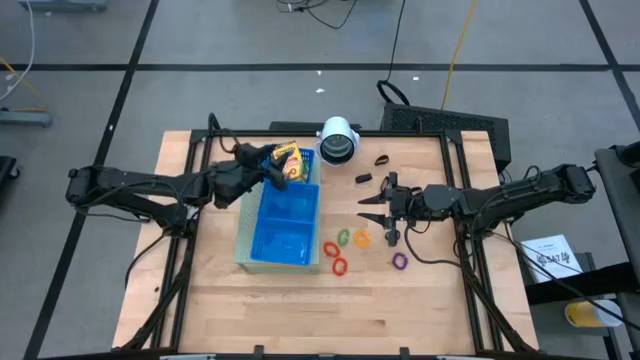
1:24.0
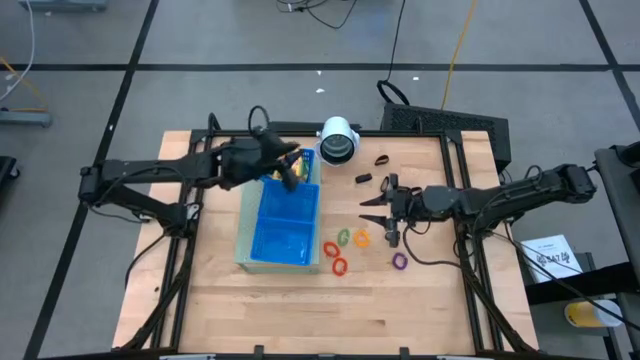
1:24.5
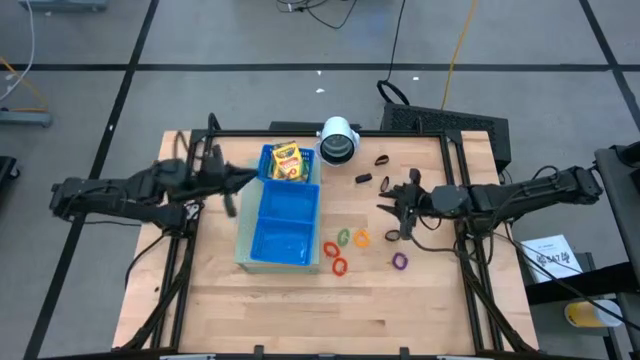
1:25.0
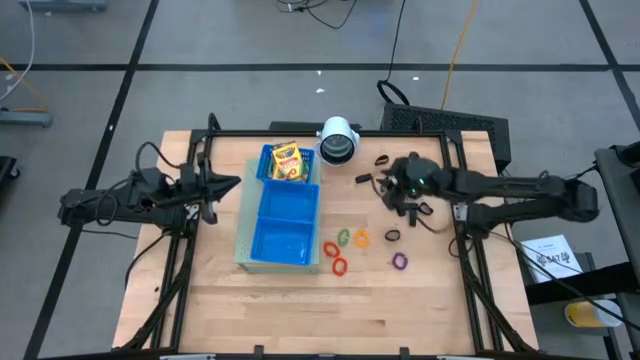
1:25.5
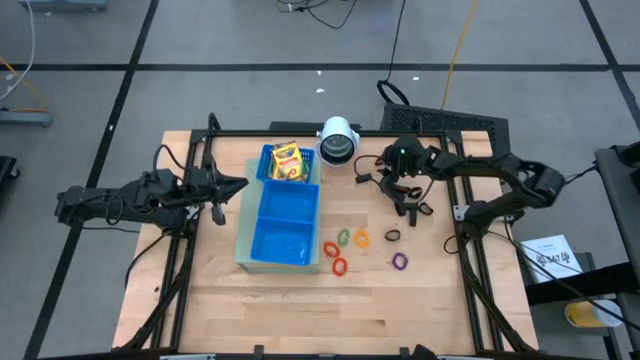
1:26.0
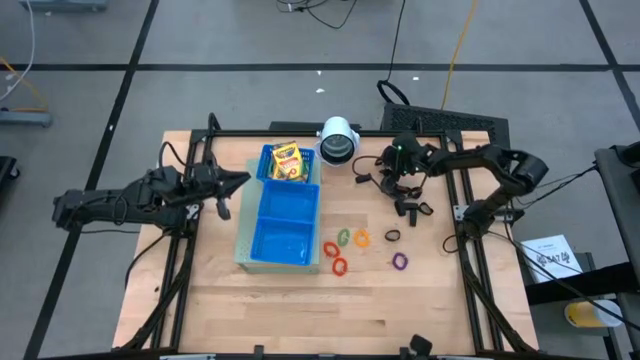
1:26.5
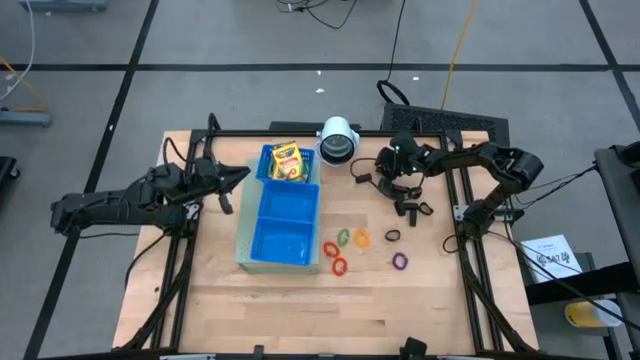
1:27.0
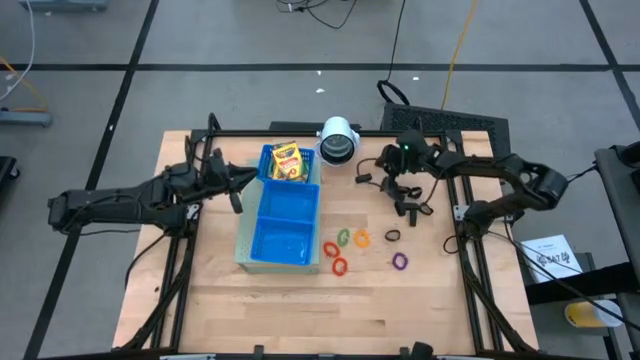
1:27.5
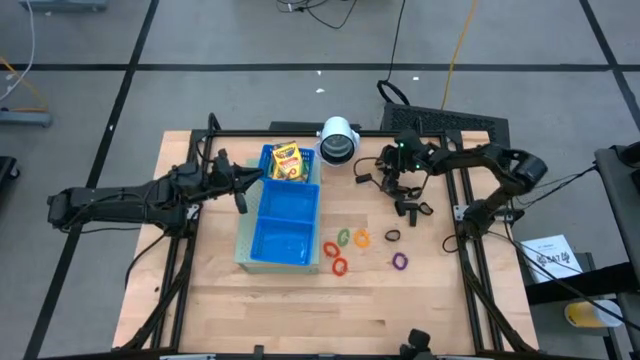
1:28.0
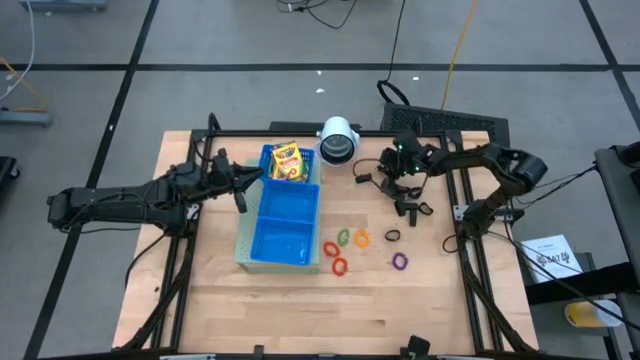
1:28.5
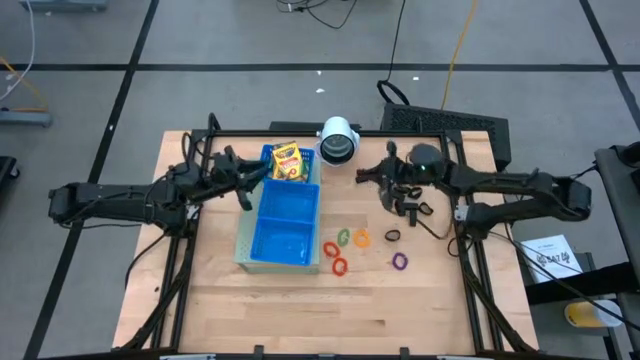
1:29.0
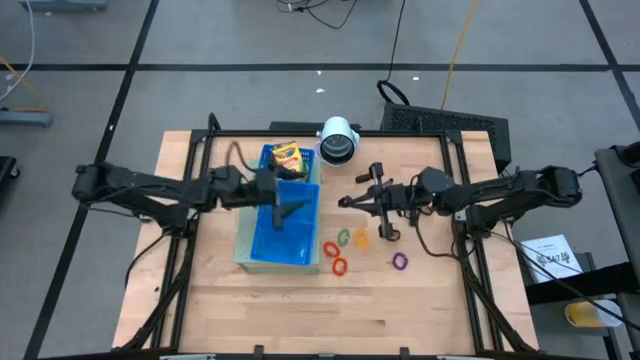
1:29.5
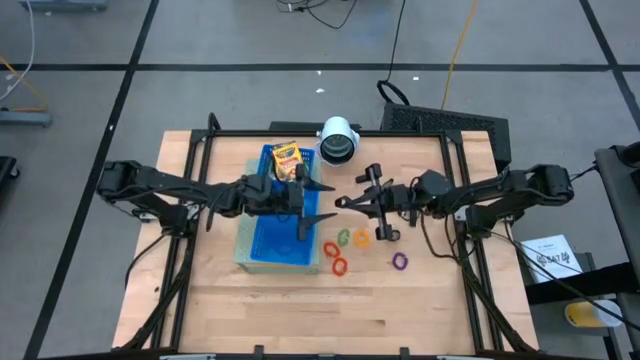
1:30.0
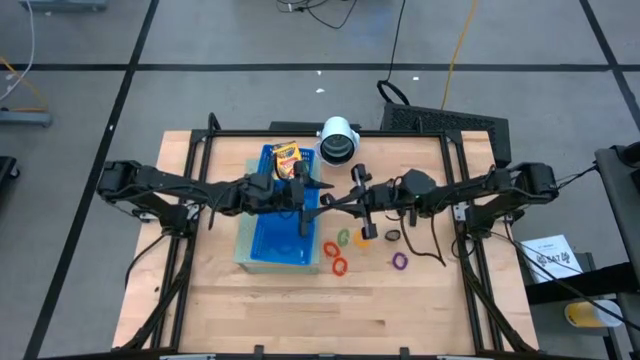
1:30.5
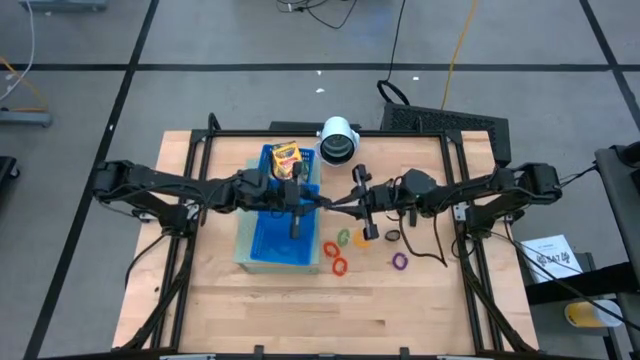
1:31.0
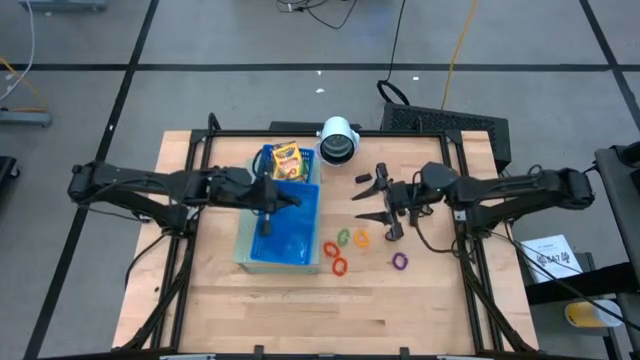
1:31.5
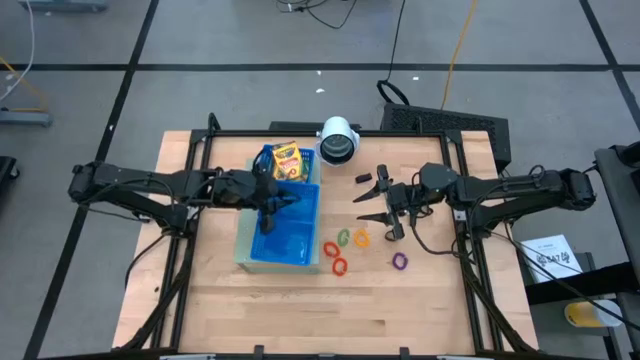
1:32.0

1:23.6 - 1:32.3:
Task: Pick & Place Office Desk Supplies
Put the black rubber band into the middle blue bin on the shelf

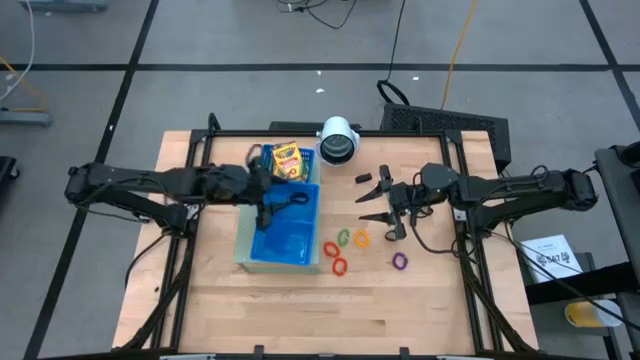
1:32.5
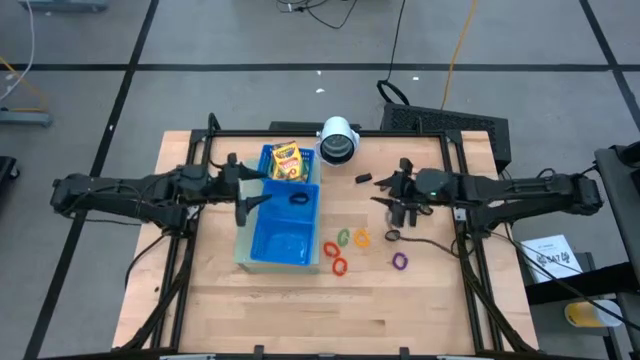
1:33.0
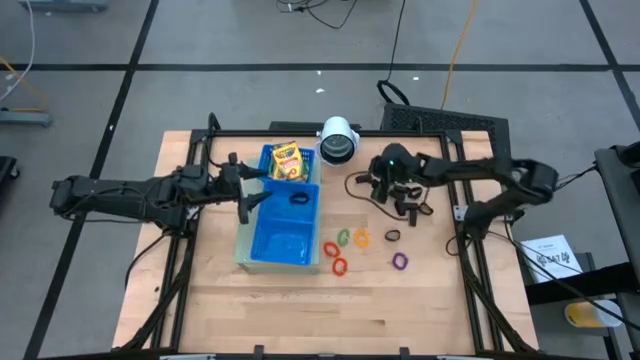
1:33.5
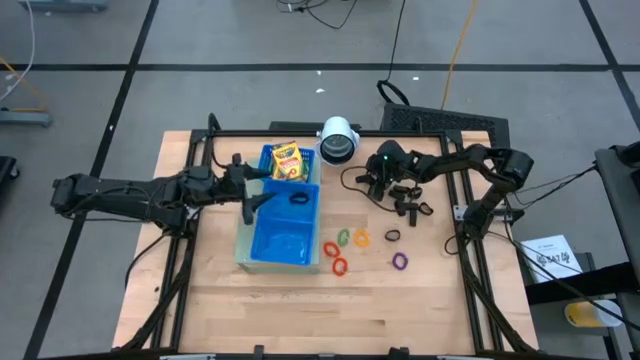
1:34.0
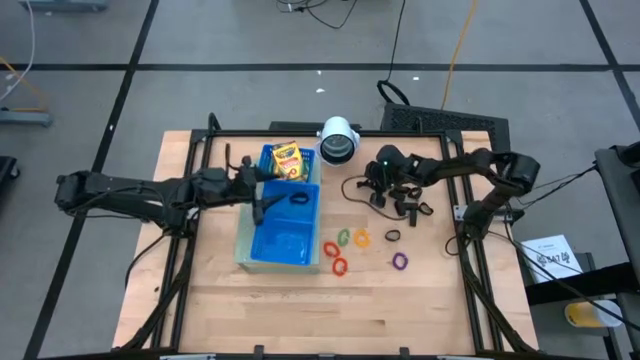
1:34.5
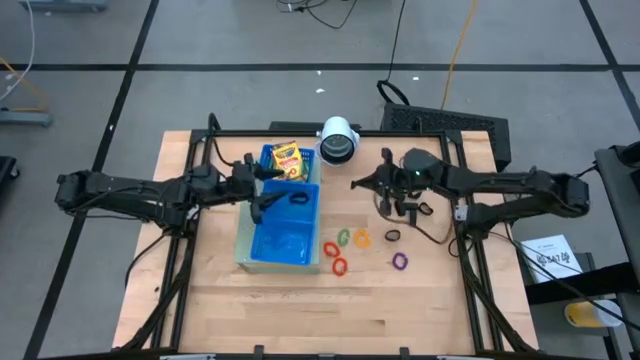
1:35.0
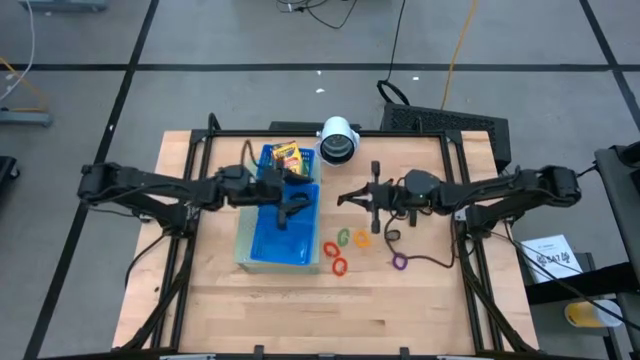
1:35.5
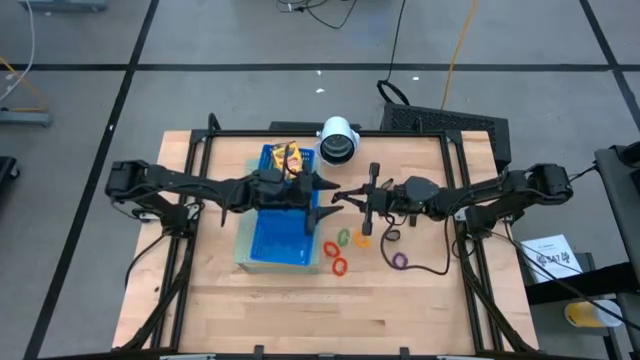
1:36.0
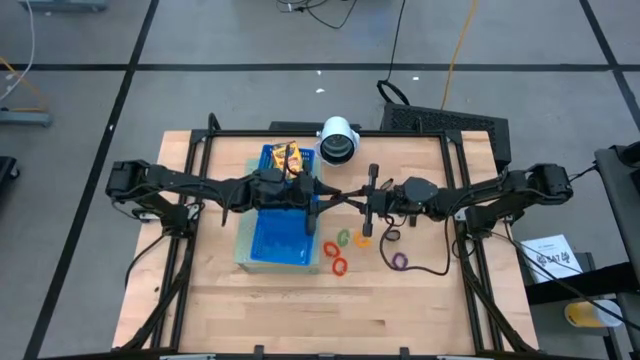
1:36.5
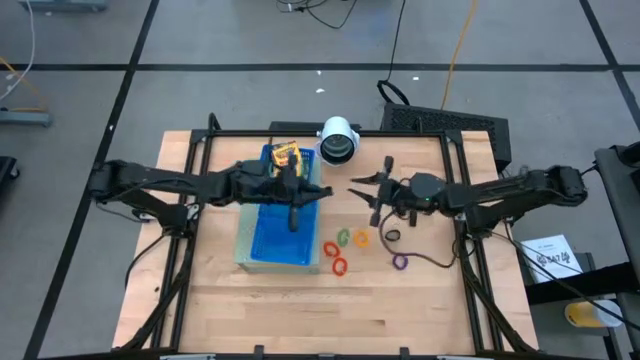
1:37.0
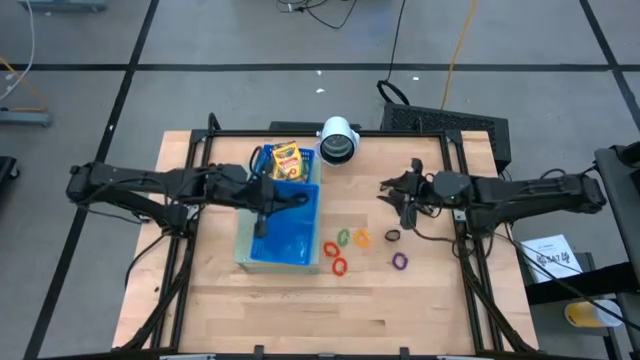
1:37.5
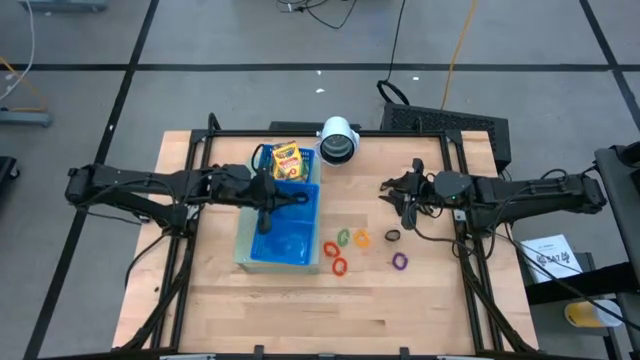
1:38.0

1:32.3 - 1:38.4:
Put the black rubber band into the middle blue bin on the shelf

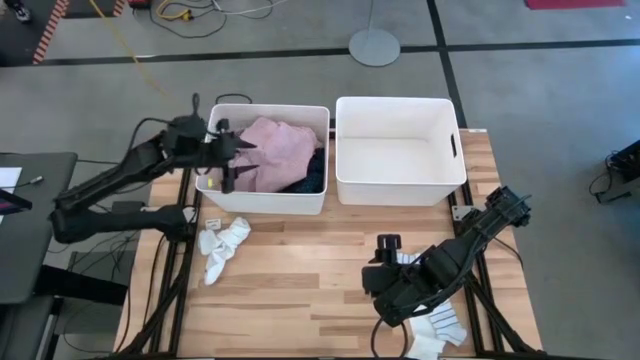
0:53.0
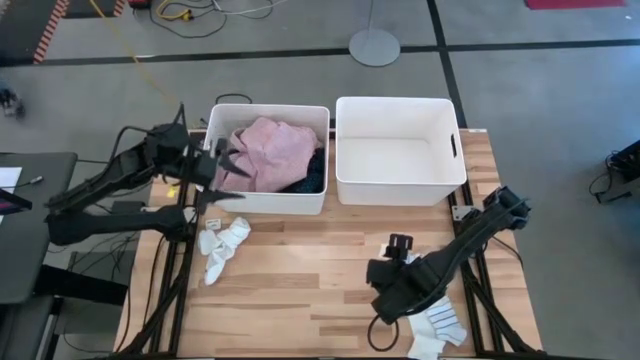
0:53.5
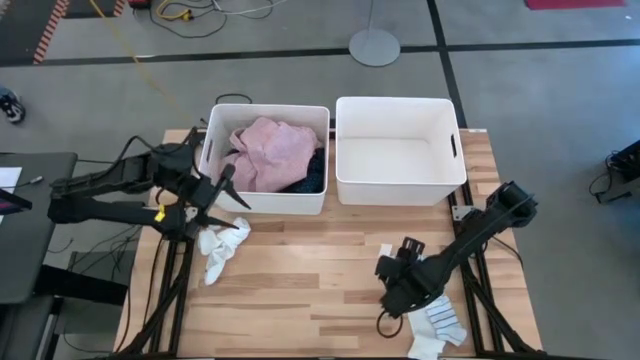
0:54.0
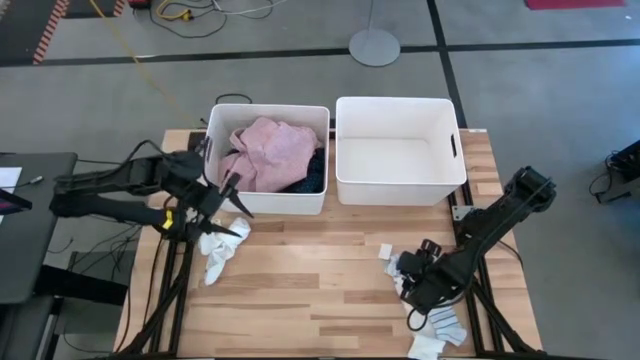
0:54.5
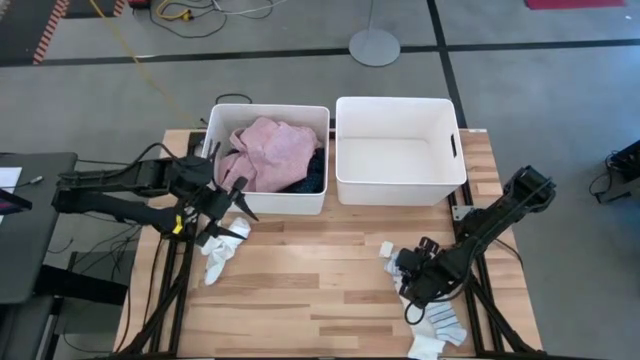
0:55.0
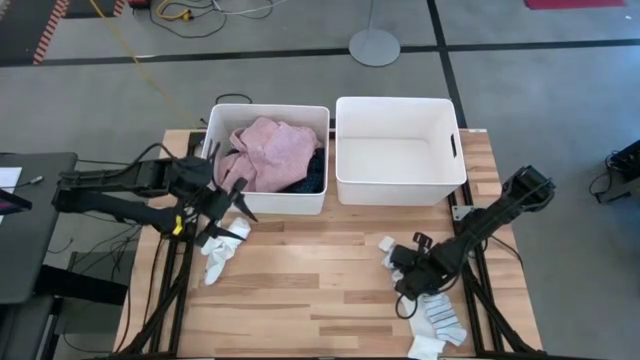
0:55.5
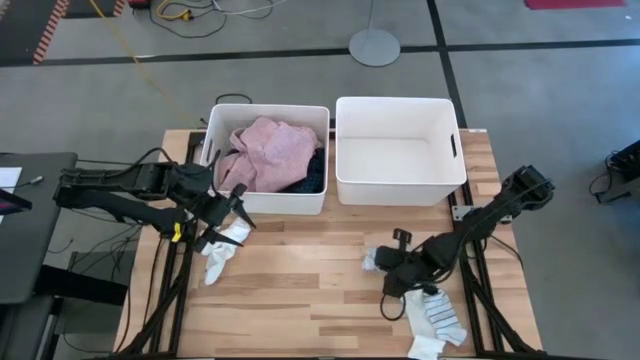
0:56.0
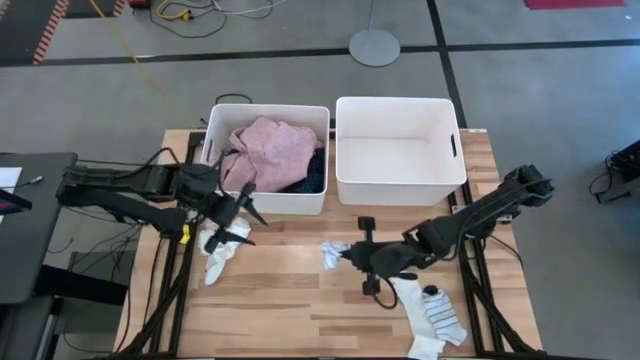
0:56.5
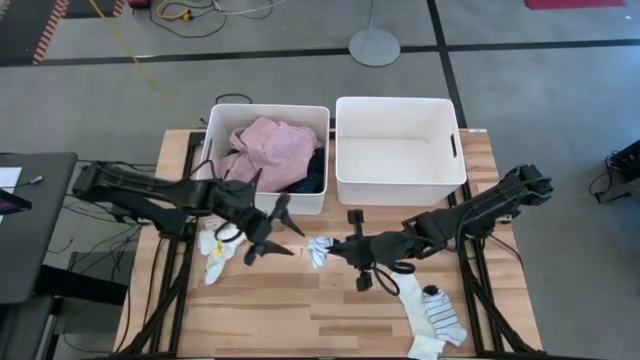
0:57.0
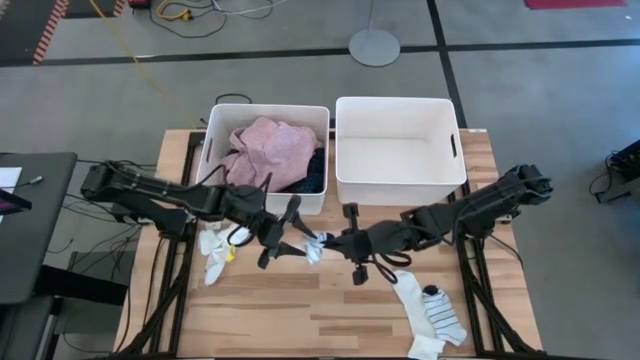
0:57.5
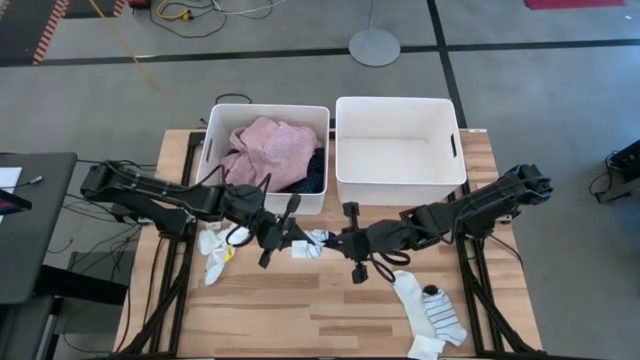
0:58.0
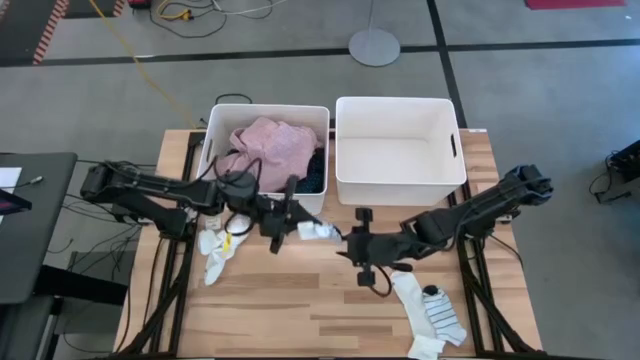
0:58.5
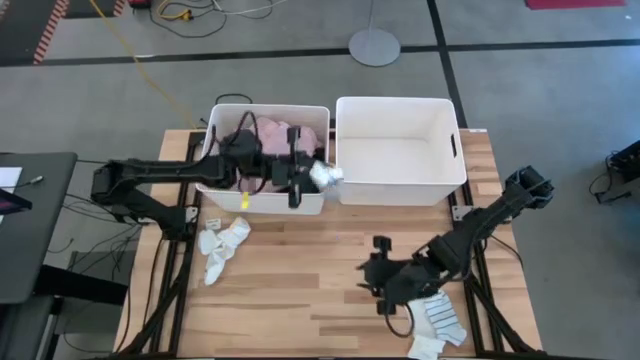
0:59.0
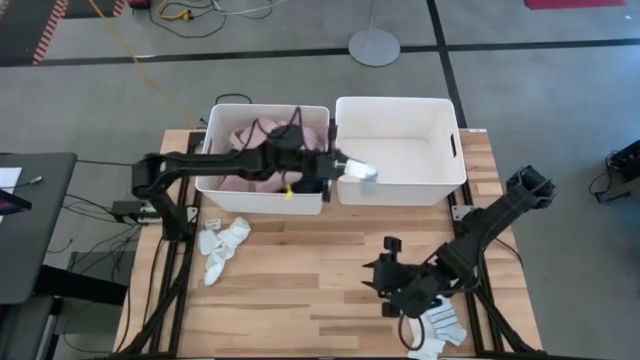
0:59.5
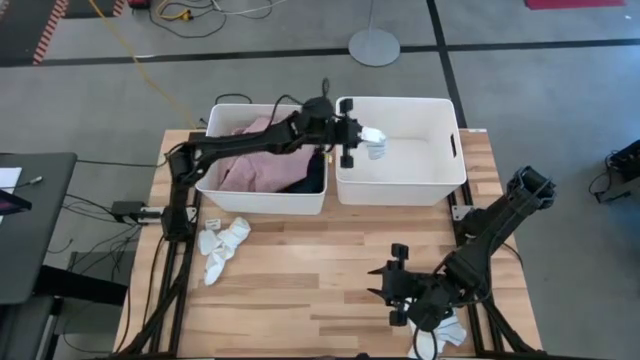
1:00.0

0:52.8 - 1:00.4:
Task: Sort clothes
Put the top blue striped sock into the right white laundry bin
